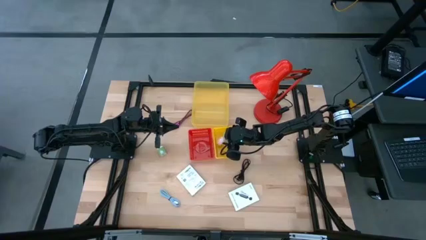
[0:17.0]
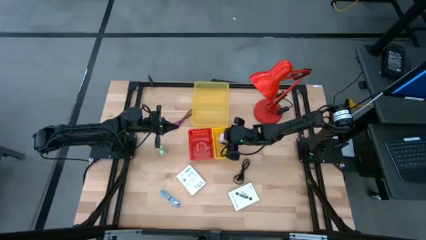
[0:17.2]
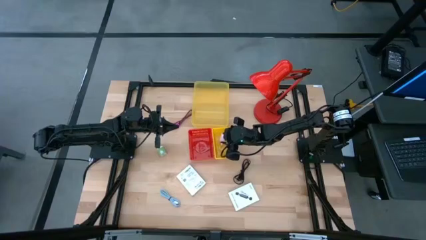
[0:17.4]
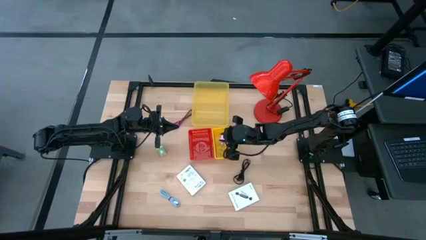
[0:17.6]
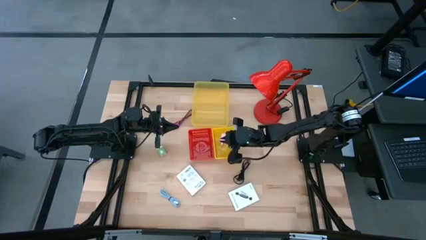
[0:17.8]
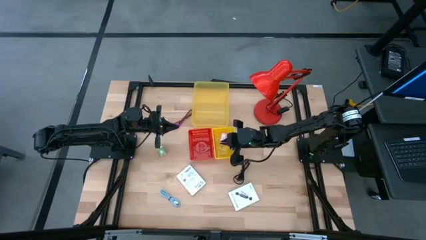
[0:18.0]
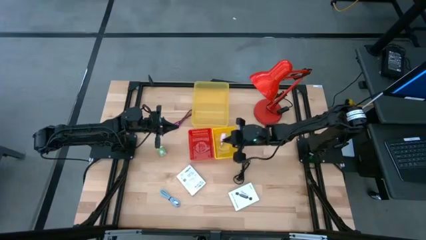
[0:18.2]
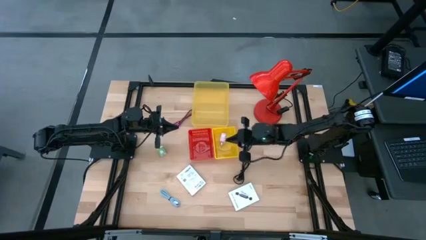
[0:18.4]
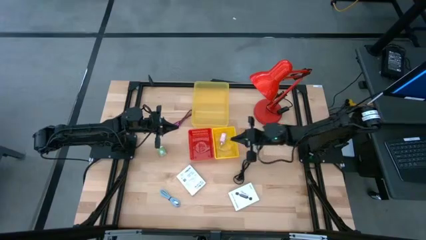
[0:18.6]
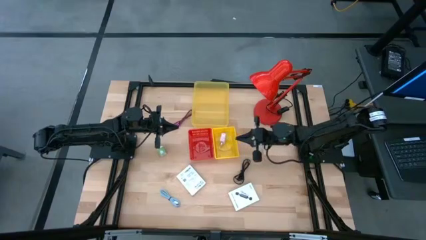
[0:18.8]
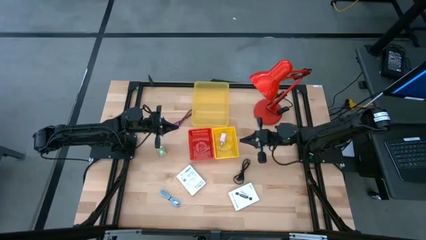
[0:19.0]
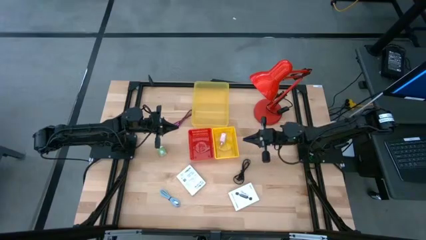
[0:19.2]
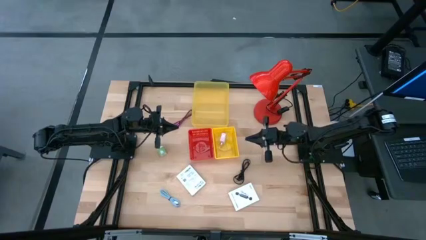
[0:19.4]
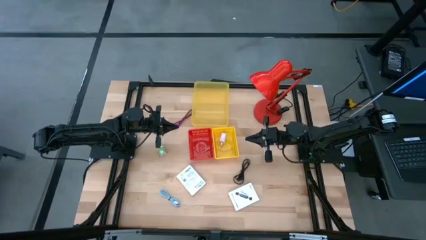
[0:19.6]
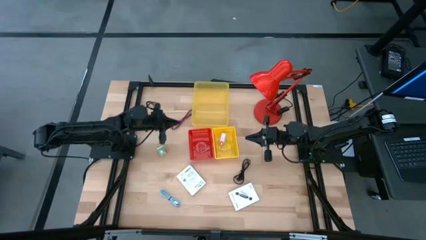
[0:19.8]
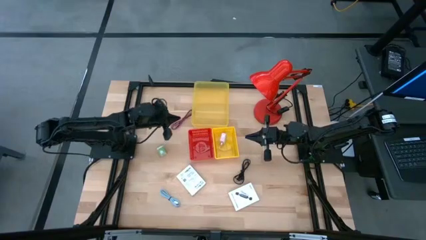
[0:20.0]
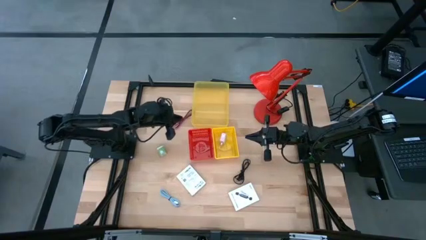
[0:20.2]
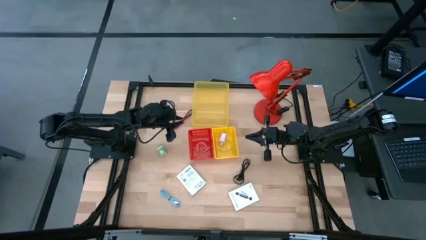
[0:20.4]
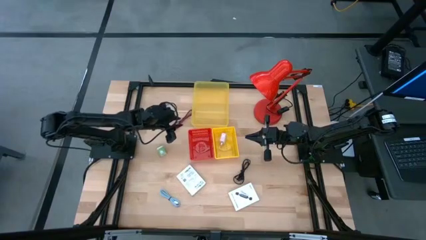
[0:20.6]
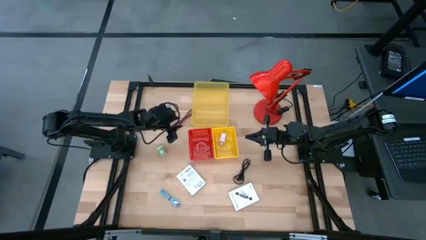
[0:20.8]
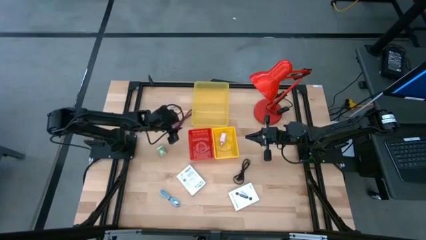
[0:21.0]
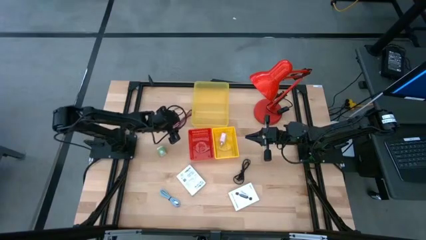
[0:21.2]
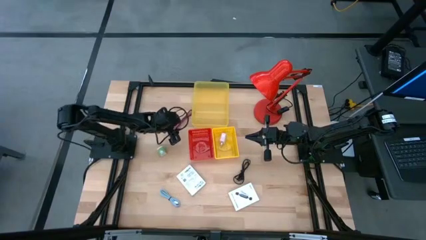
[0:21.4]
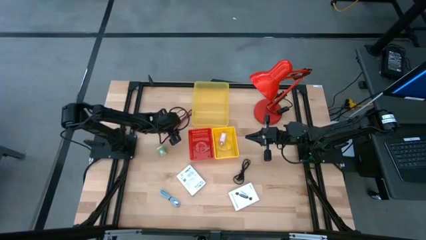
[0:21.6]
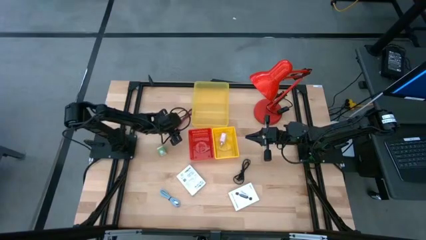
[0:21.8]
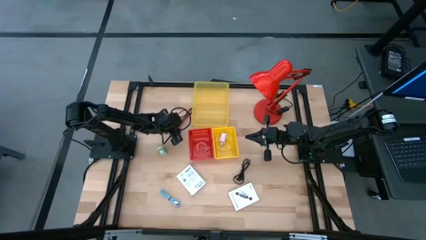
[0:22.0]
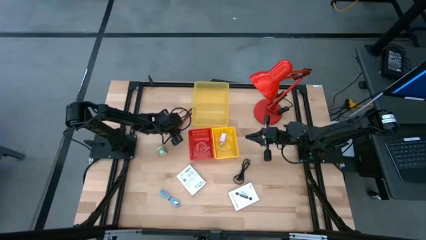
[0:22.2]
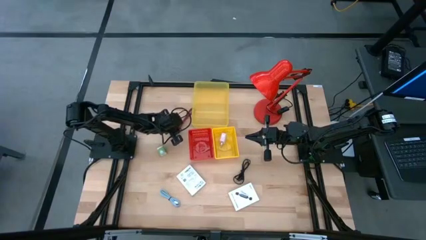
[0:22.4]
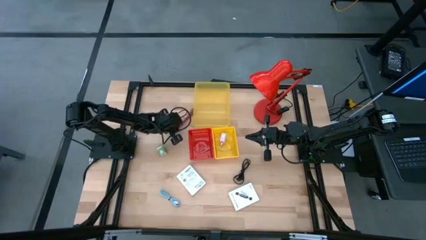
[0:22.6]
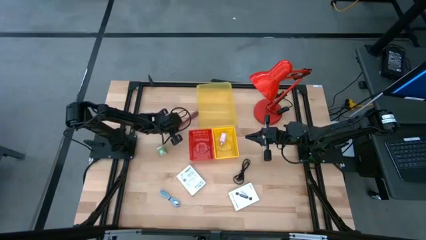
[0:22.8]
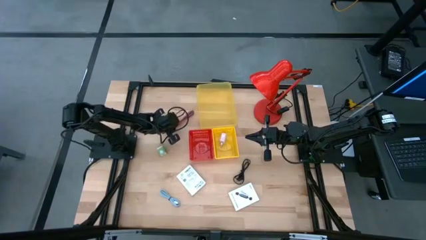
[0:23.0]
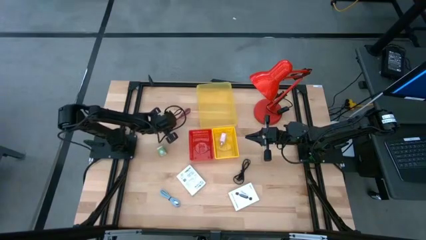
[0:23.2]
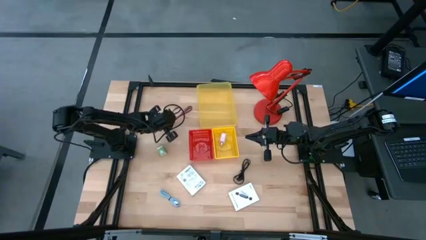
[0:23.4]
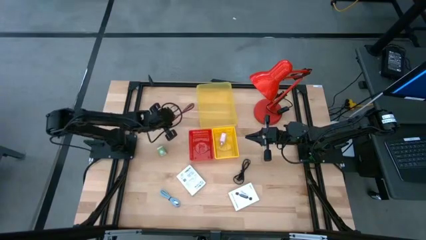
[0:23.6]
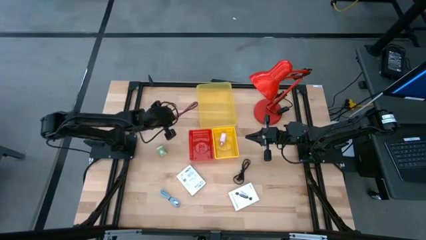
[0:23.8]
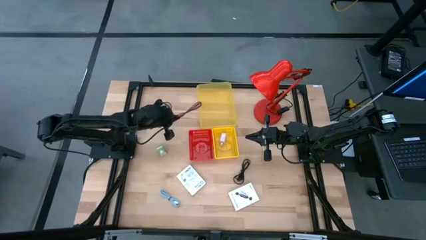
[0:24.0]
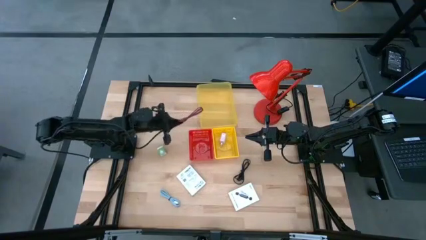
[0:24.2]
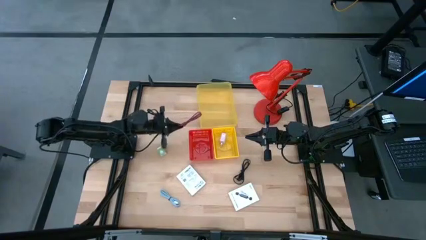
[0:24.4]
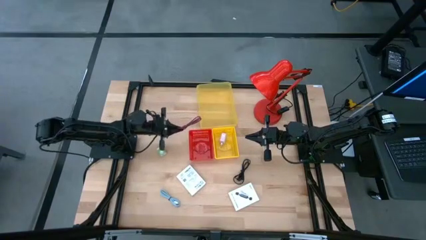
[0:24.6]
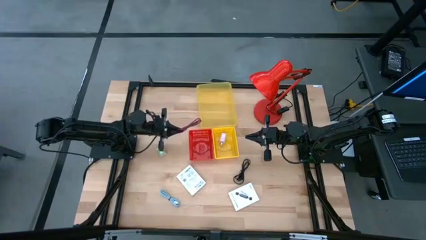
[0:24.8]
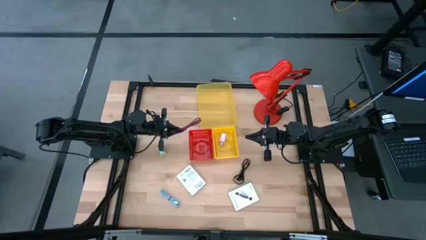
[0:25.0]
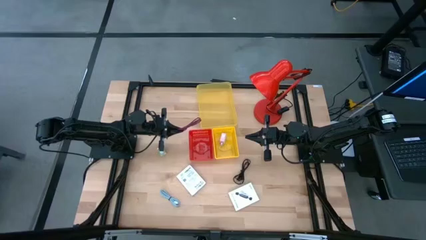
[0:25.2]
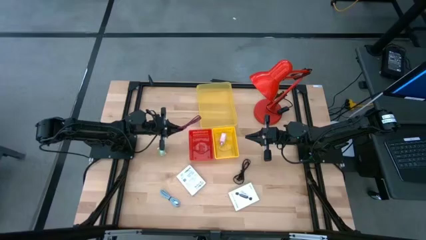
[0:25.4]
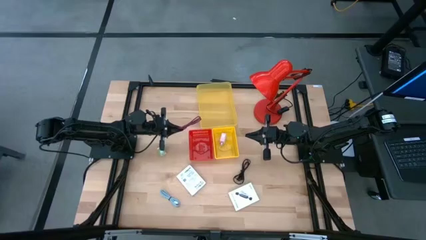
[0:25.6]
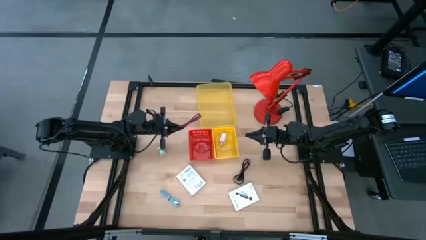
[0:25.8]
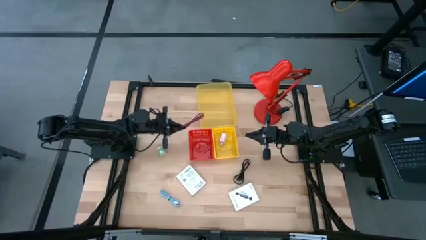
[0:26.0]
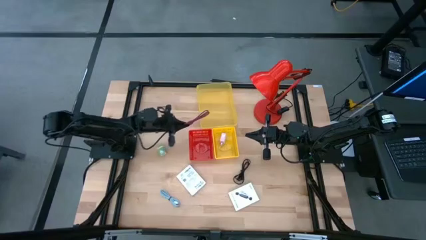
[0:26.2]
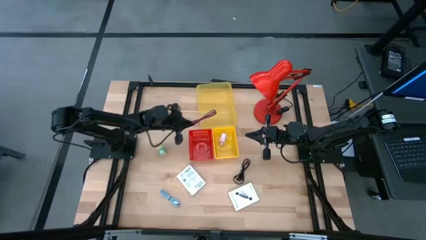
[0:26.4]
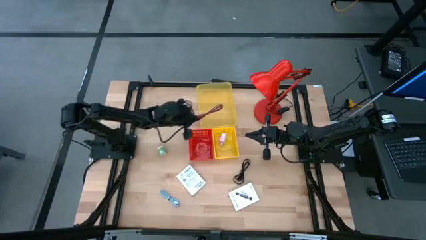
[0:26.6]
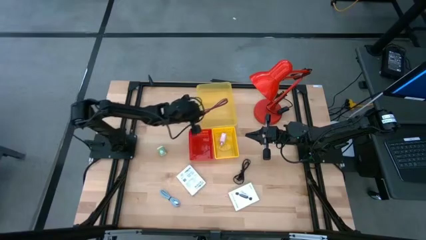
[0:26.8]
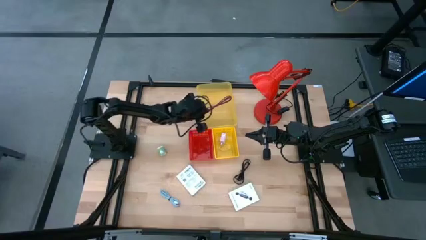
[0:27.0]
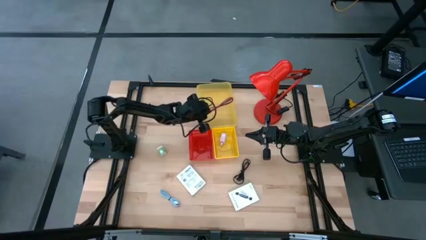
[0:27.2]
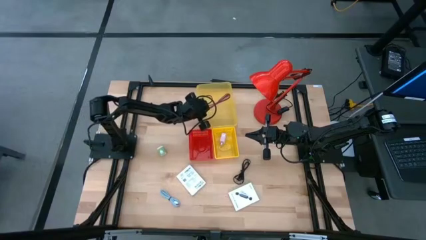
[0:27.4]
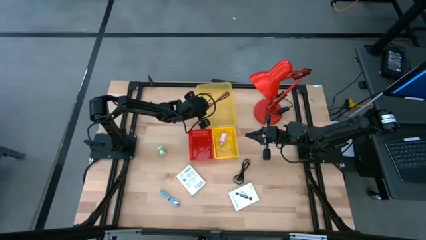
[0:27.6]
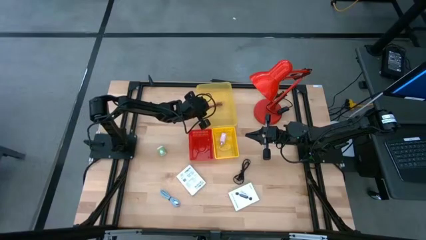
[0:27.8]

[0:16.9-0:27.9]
Task: Pick and place items into bin
Put the pink cable wire into the top yellow bin
